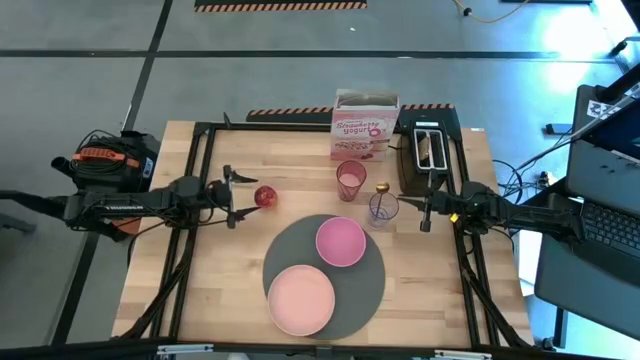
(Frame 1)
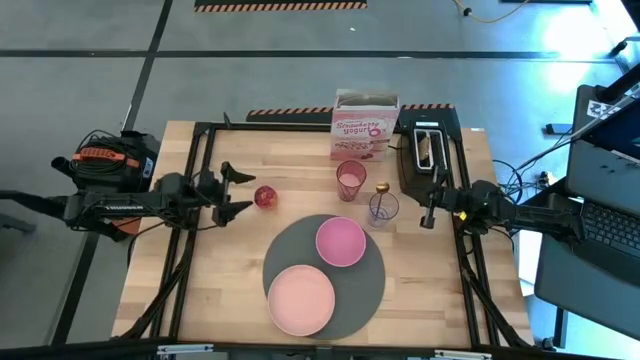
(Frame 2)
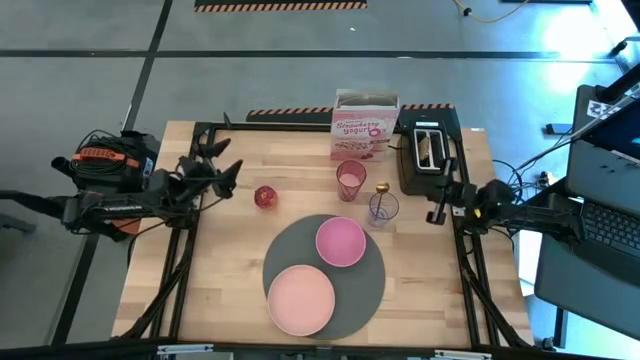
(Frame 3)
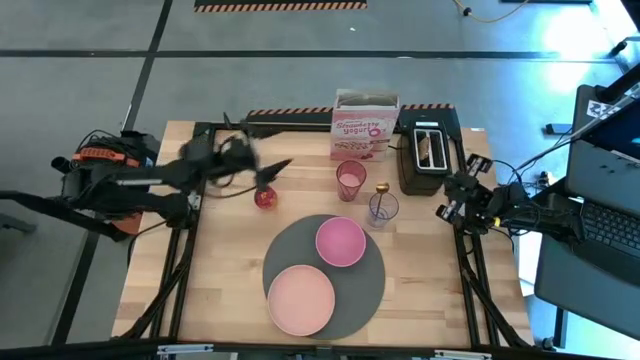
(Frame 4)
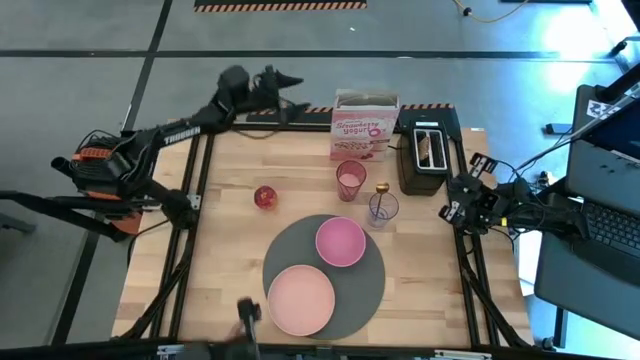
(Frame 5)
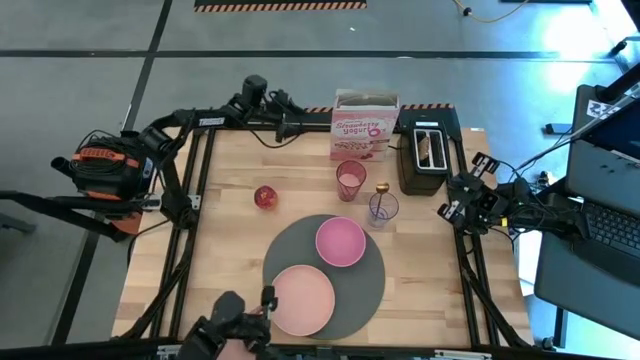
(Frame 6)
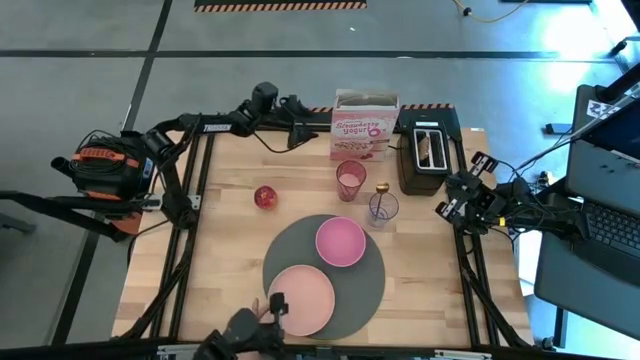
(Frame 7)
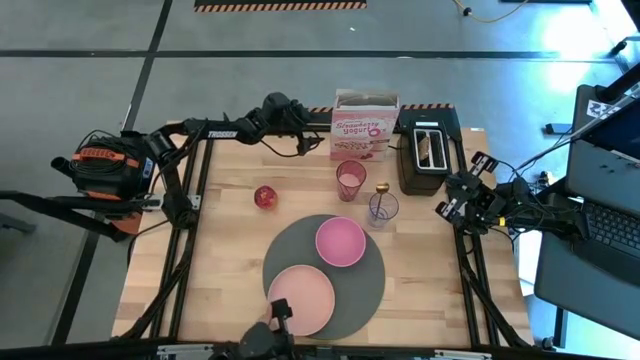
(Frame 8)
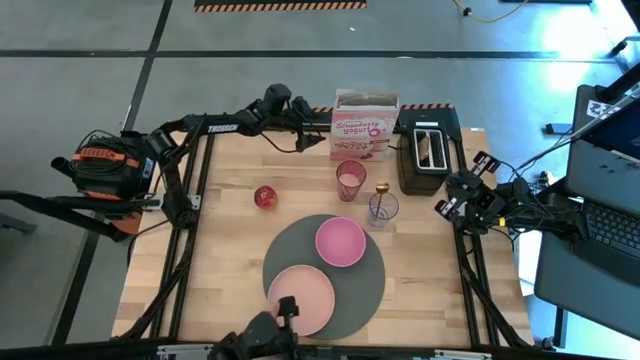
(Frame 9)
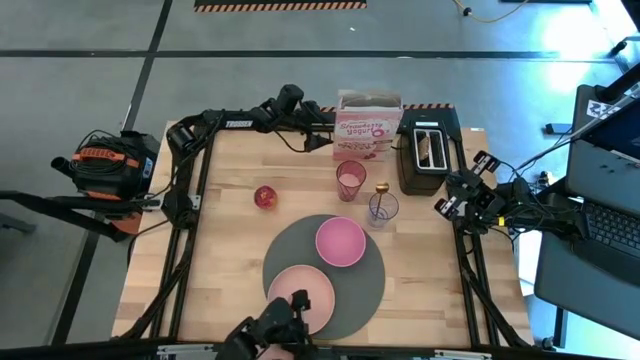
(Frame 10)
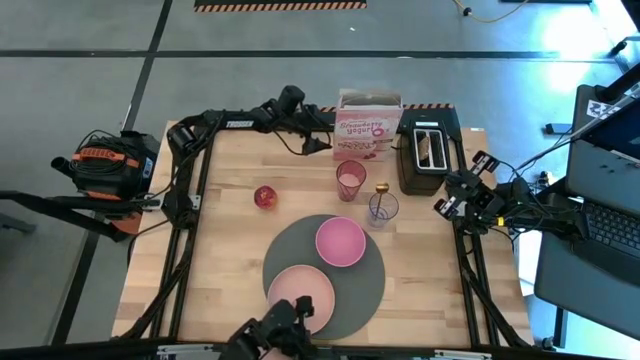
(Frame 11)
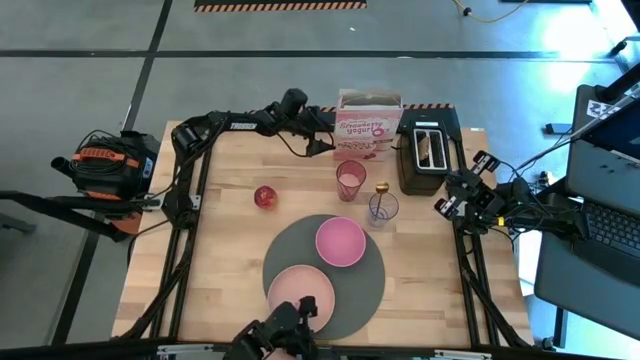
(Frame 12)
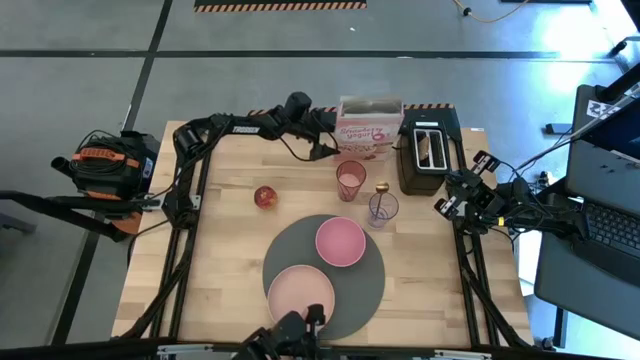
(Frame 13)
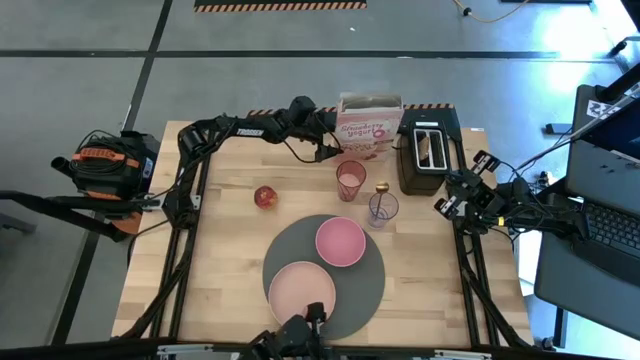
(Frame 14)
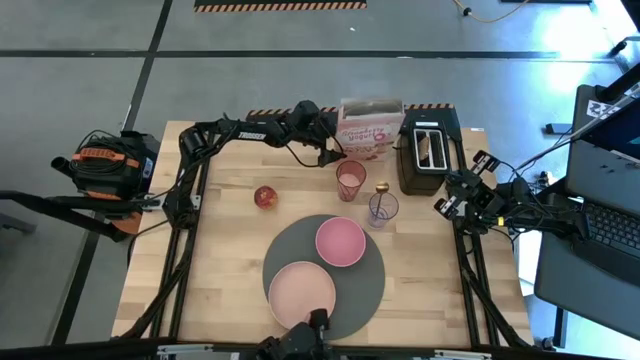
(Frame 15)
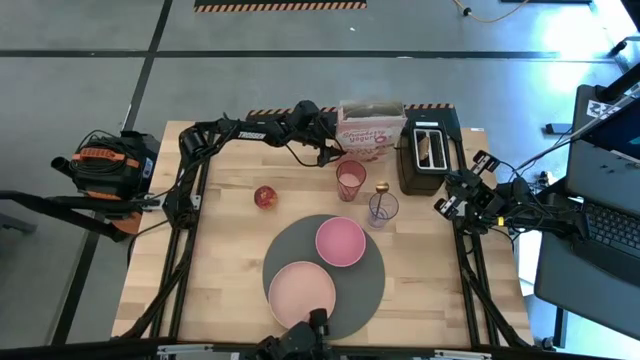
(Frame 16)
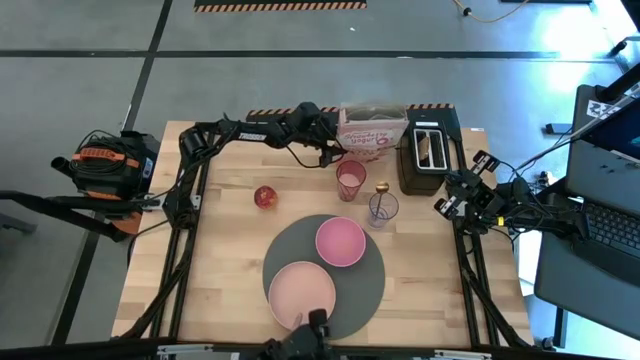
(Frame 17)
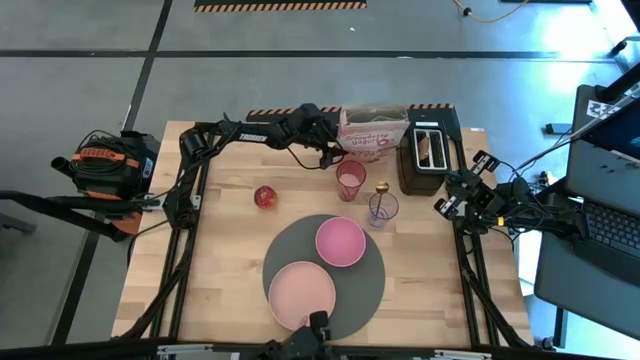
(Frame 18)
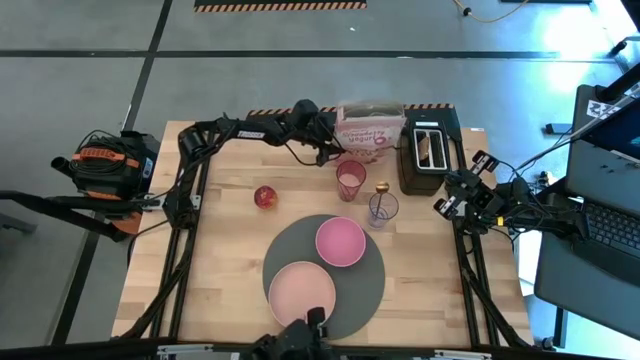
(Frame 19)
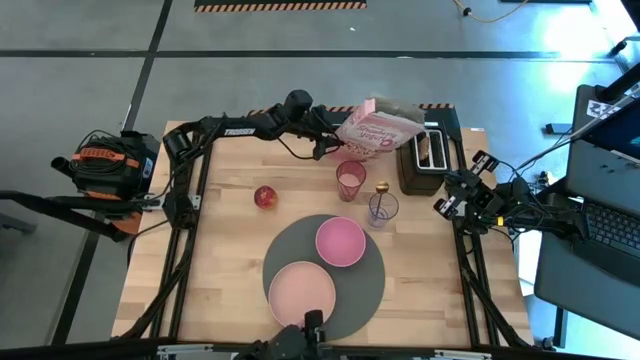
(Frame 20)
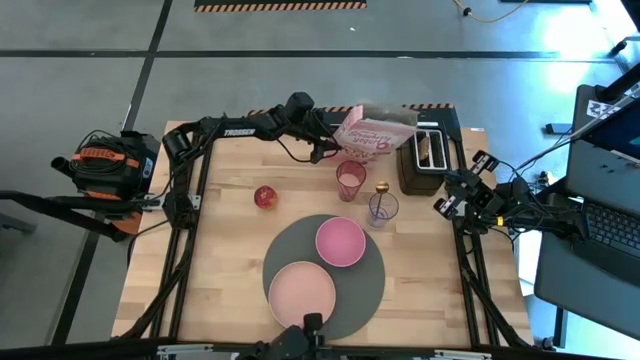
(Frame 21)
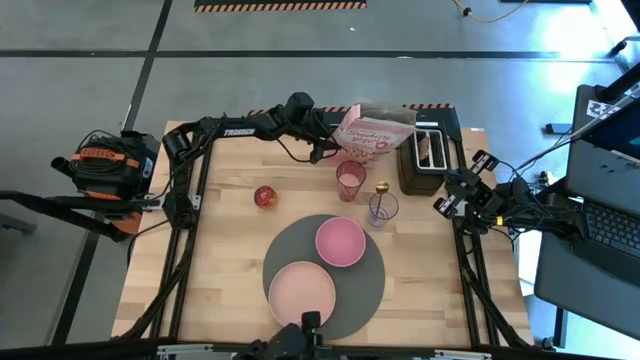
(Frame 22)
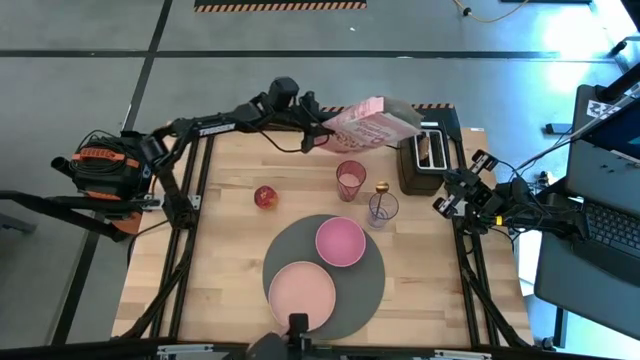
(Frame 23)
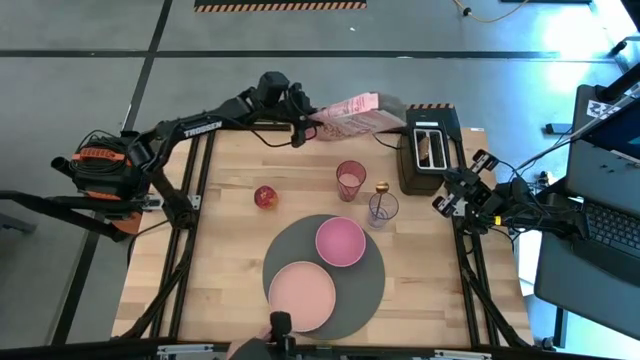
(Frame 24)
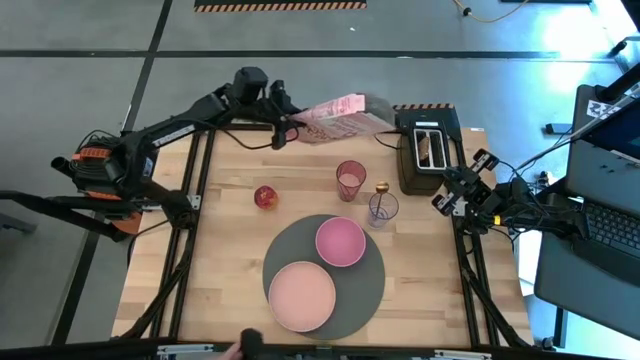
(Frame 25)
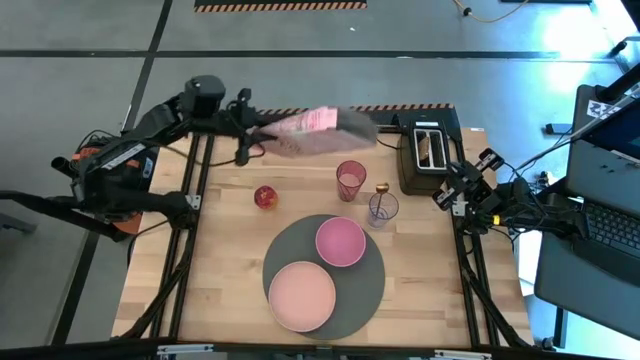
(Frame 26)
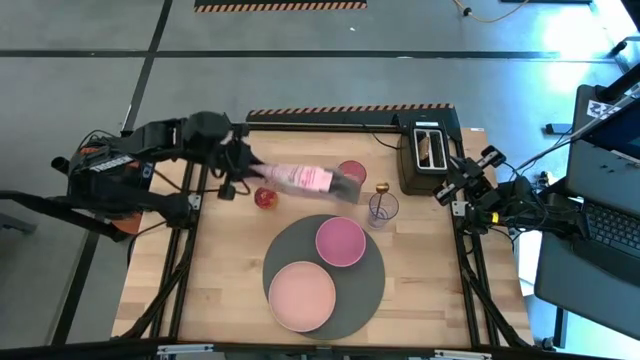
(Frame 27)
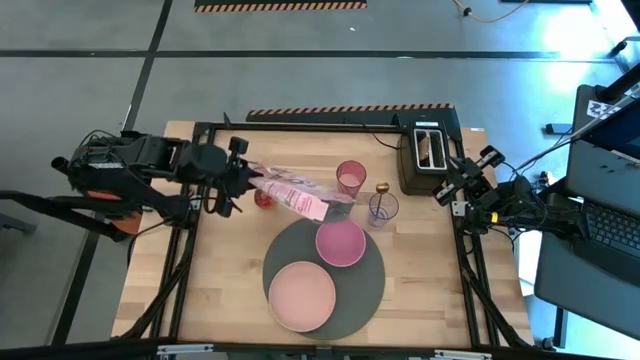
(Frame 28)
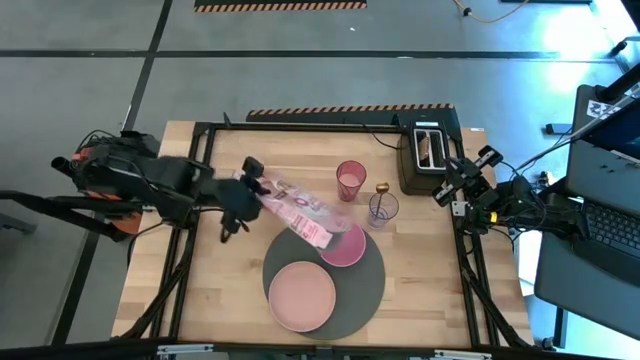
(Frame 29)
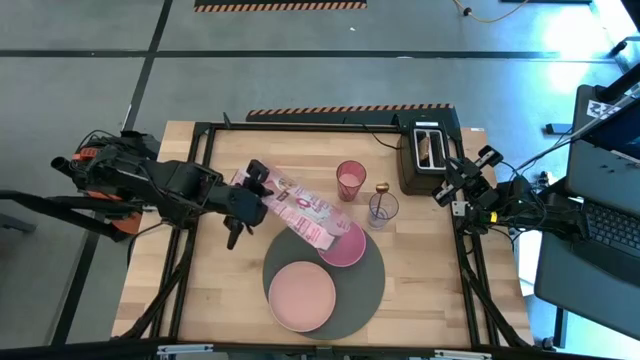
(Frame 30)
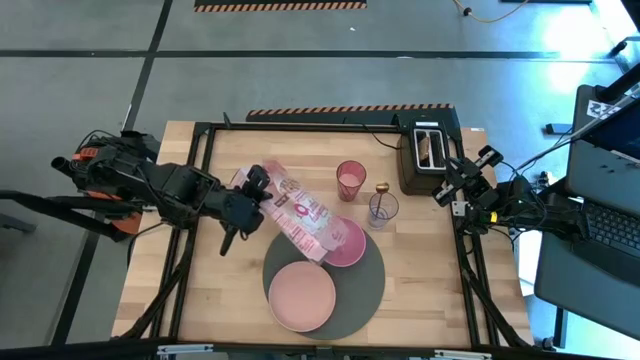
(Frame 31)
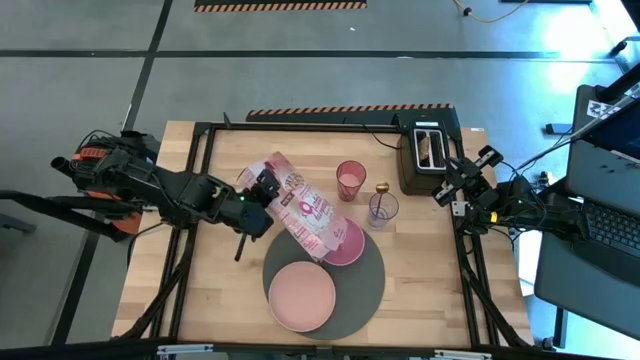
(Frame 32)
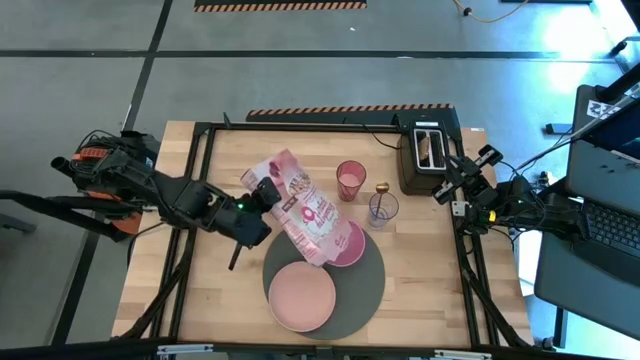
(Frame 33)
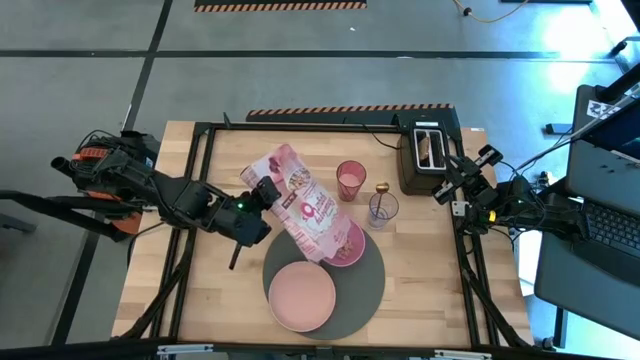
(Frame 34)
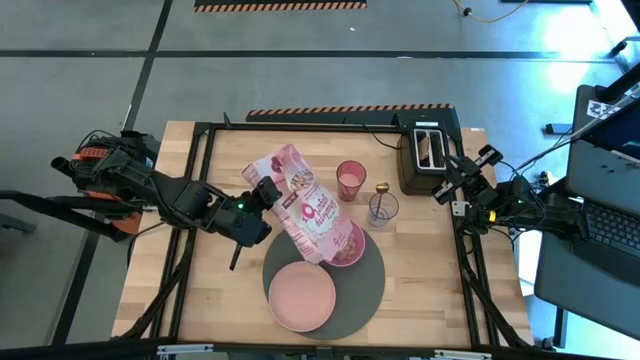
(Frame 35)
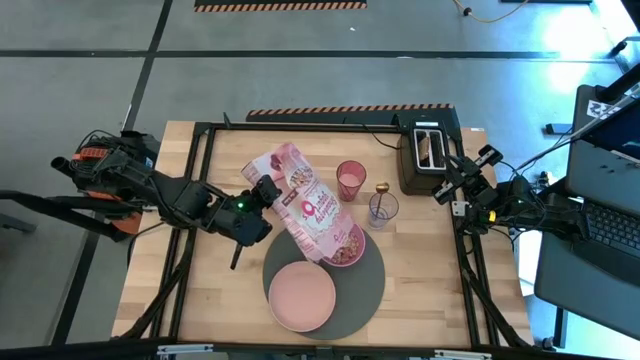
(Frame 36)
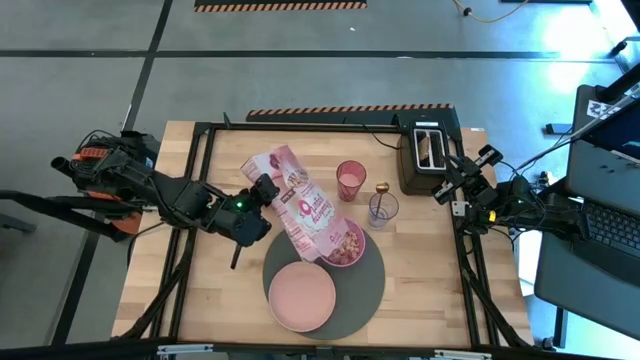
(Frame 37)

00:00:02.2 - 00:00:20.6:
Task: Arrange a breakfast setting
Pour the cereals from the pink cereal box into the pink bowl
